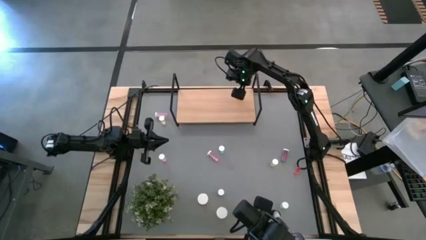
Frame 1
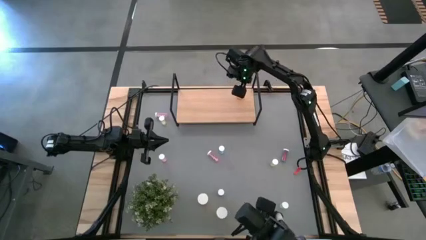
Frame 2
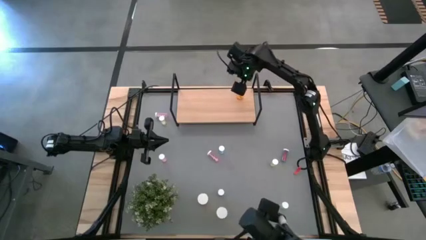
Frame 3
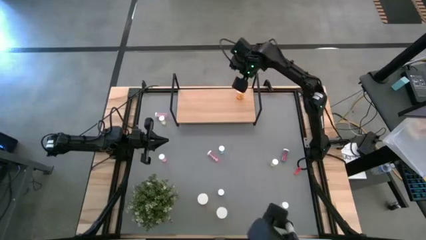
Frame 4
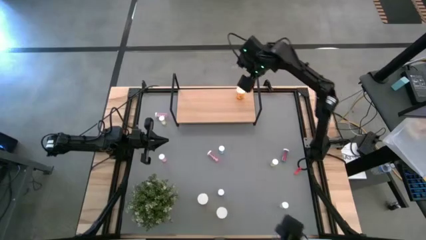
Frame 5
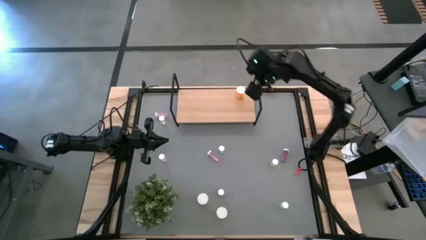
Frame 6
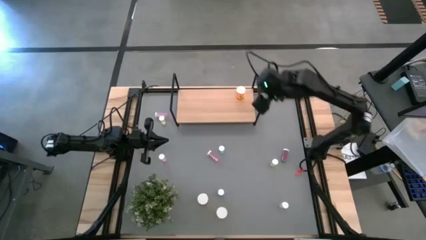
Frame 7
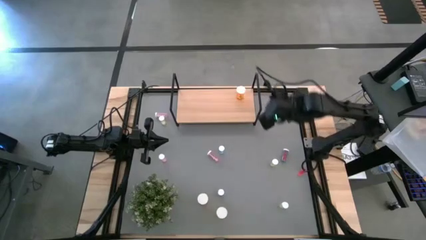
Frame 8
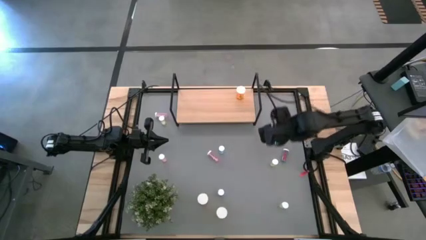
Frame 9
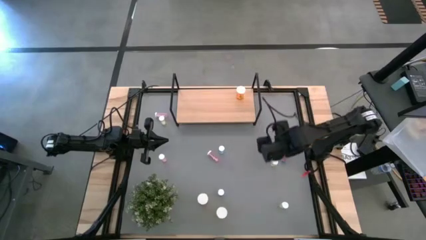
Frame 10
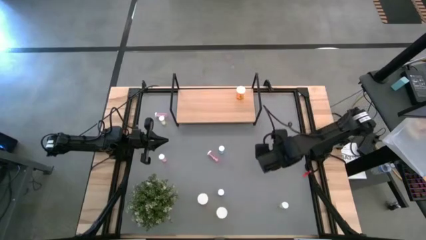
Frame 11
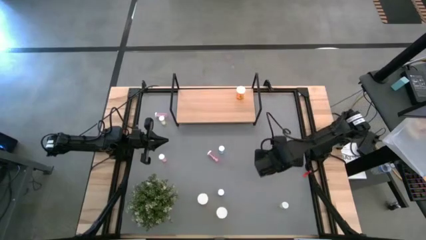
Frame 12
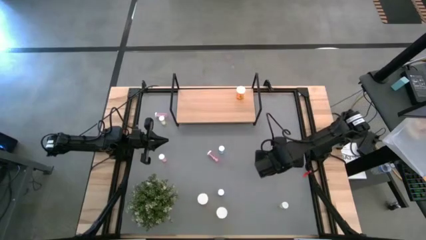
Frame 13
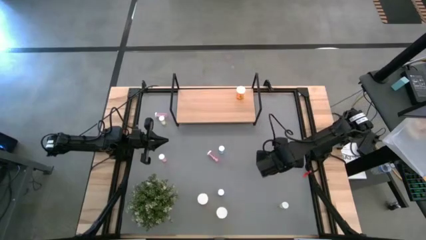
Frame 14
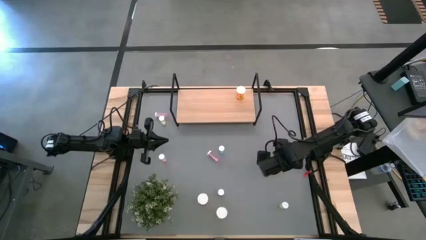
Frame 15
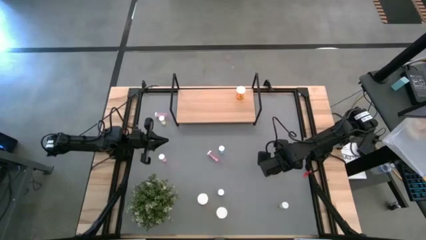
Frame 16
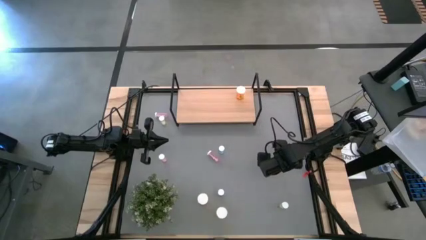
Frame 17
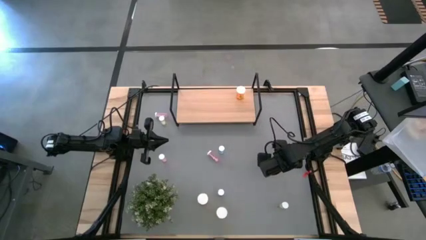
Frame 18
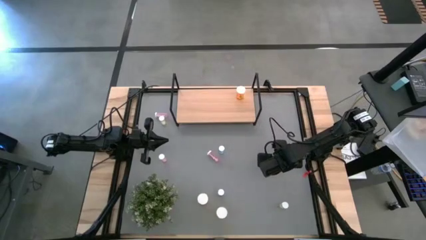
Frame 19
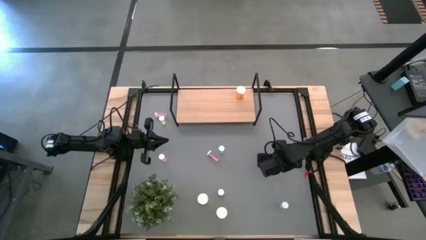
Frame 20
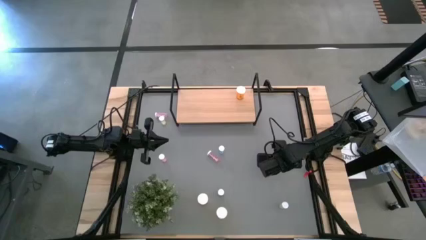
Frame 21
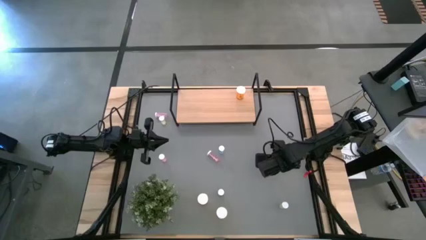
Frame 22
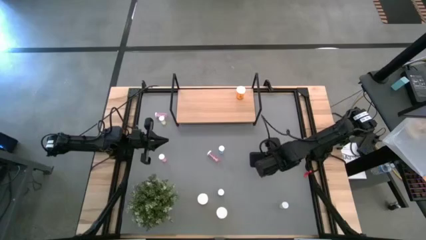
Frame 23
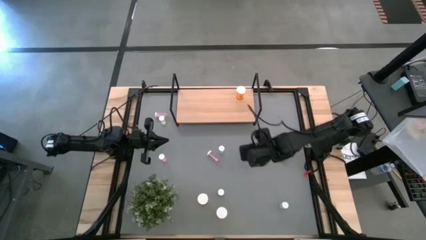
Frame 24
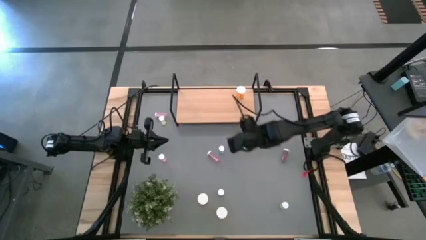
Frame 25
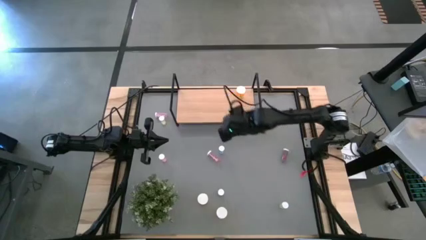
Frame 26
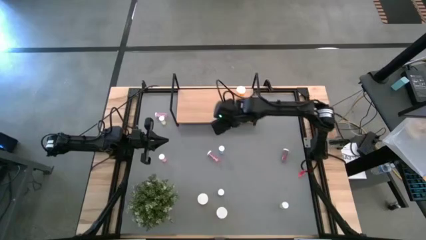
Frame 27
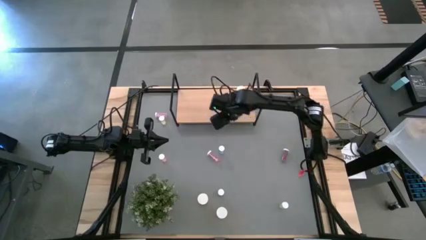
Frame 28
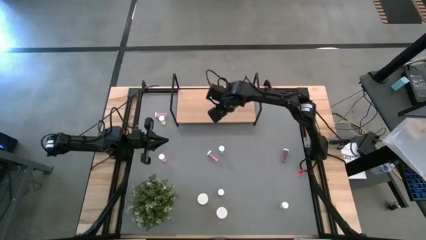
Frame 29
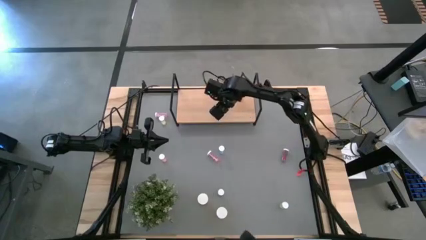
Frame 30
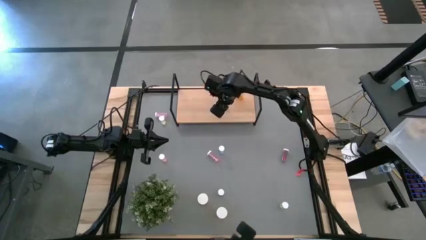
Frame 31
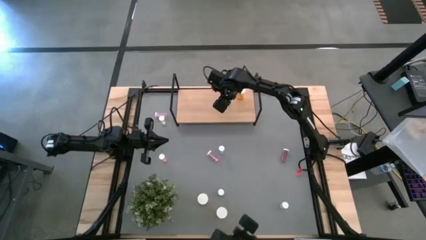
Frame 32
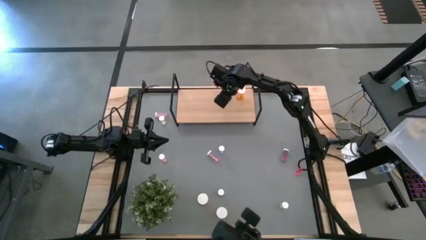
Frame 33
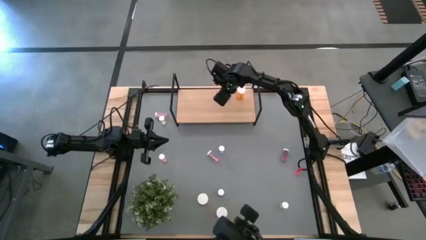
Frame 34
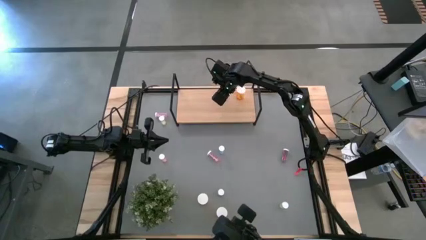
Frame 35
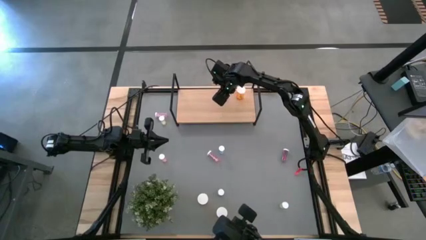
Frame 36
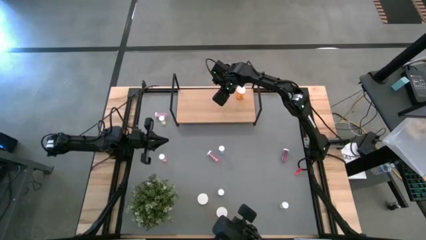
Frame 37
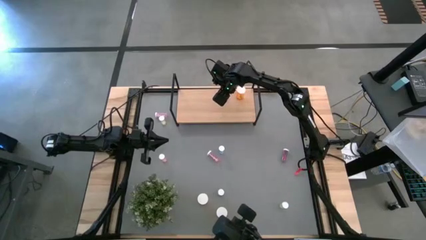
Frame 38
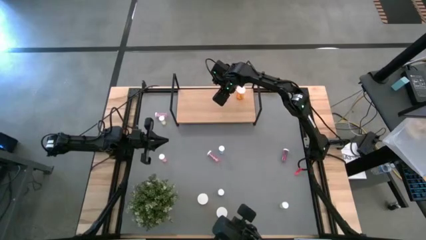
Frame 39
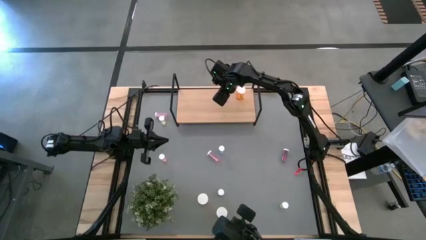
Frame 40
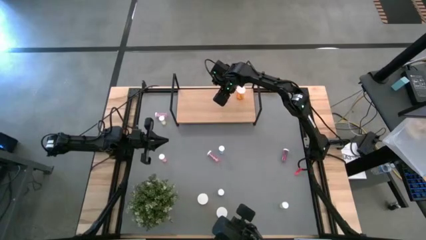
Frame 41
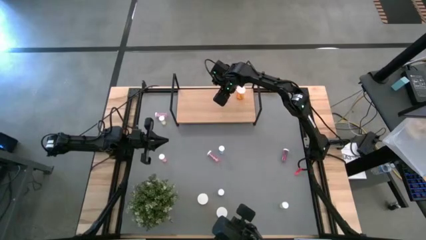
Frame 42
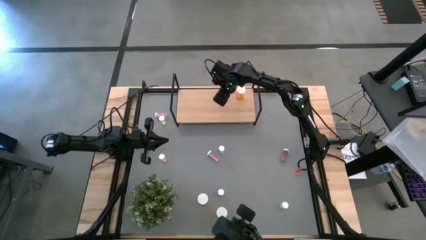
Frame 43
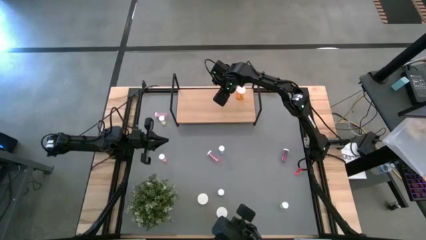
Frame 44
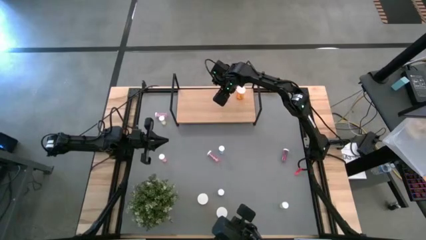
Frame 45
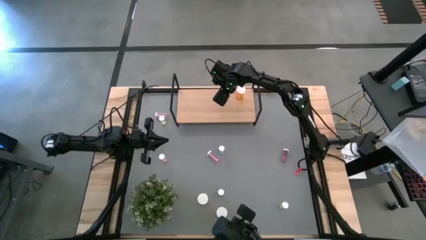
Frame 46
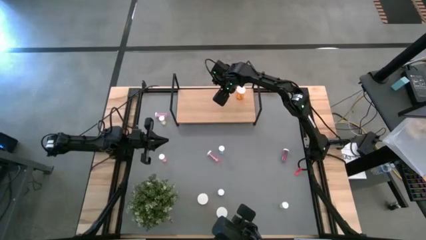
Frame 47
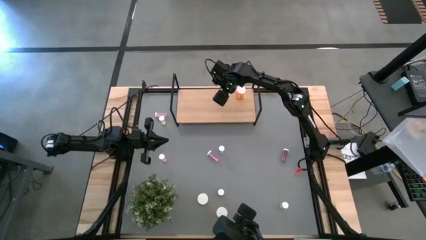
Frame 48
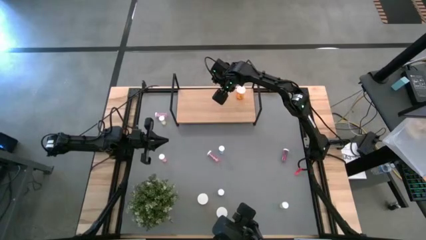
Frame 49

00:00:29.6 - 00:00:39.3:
Task: Pick and place medicine bottles onto shelf by color
Put the middle left yellow pill bottle on the shelf
